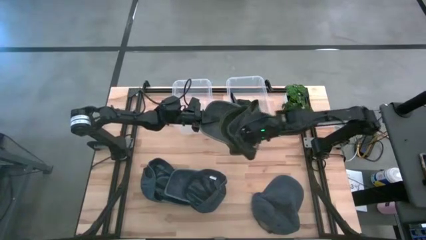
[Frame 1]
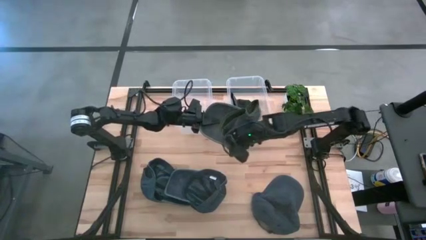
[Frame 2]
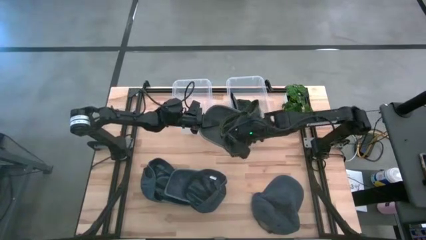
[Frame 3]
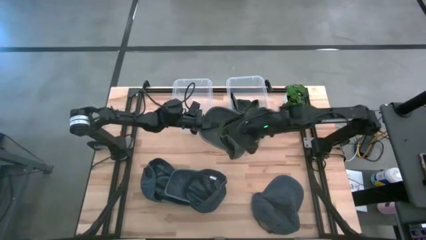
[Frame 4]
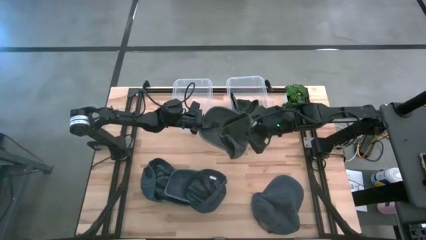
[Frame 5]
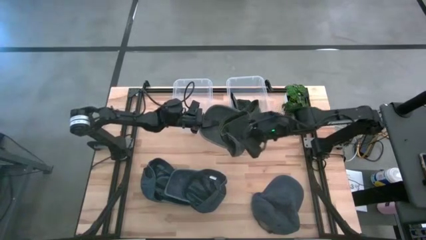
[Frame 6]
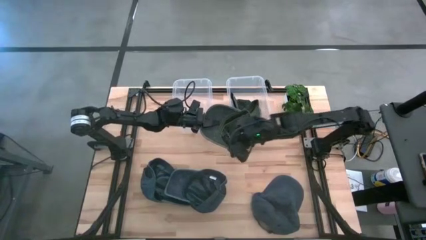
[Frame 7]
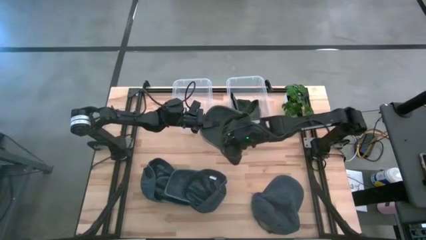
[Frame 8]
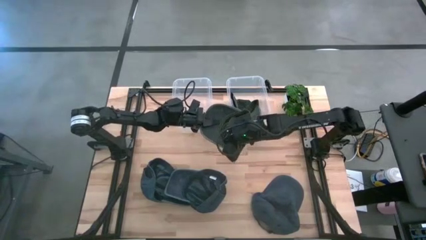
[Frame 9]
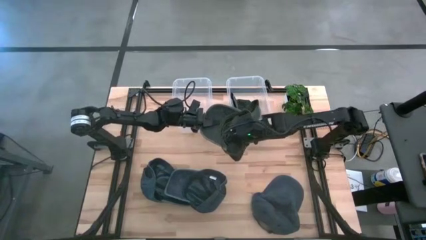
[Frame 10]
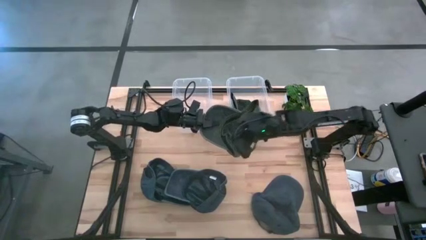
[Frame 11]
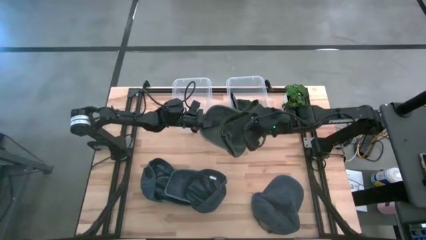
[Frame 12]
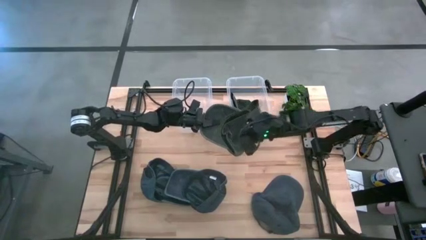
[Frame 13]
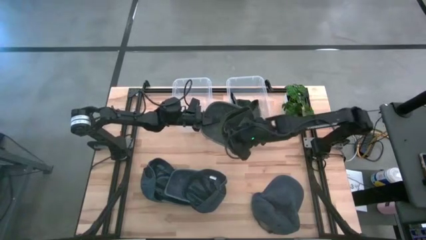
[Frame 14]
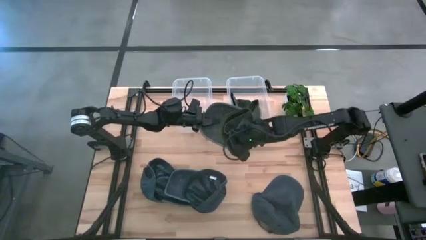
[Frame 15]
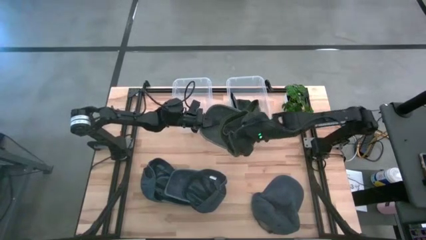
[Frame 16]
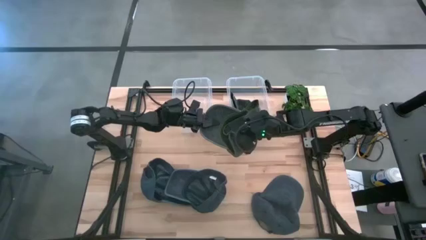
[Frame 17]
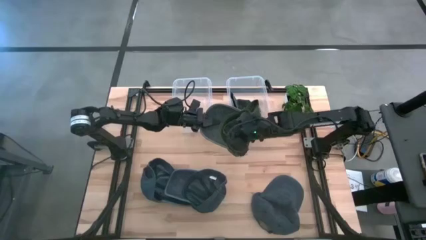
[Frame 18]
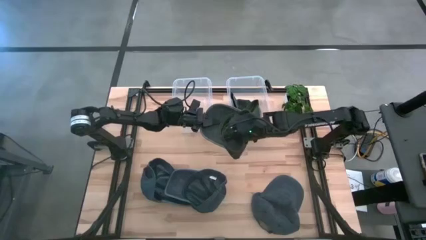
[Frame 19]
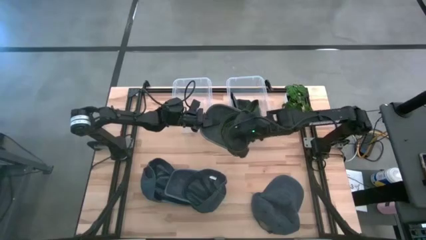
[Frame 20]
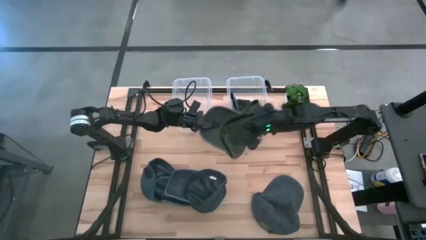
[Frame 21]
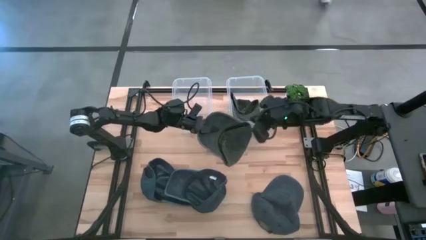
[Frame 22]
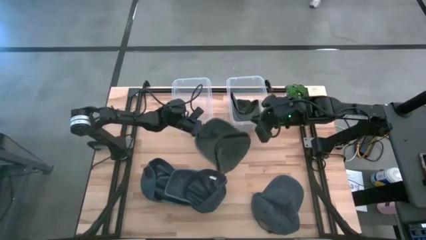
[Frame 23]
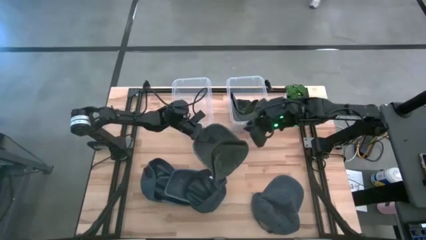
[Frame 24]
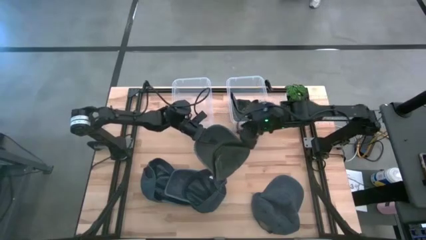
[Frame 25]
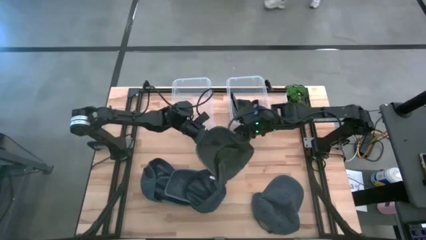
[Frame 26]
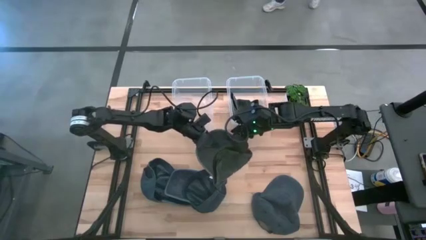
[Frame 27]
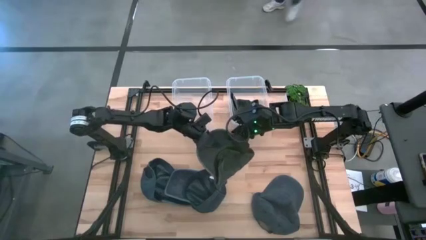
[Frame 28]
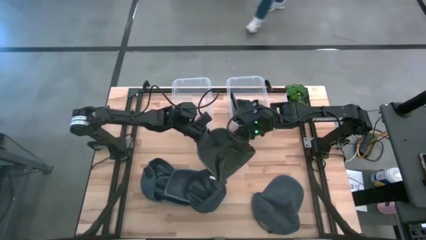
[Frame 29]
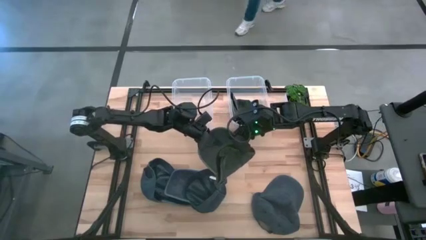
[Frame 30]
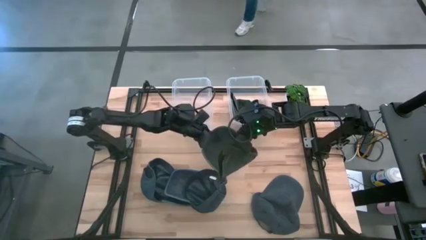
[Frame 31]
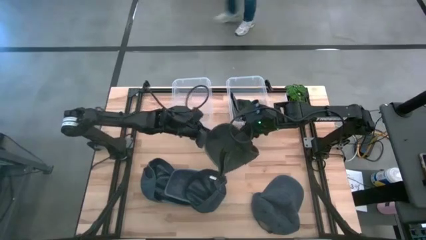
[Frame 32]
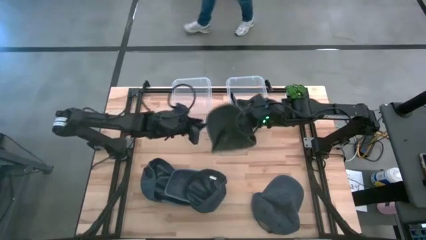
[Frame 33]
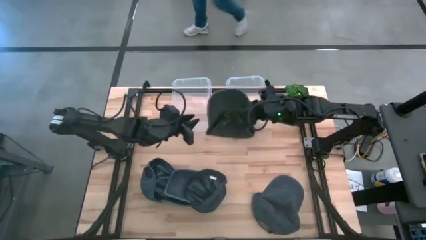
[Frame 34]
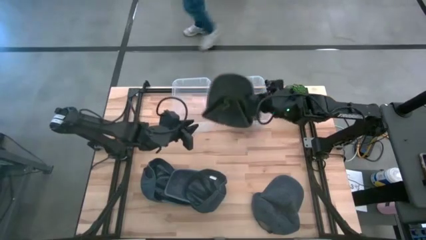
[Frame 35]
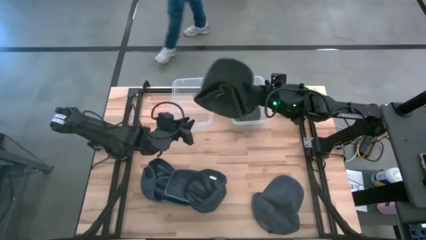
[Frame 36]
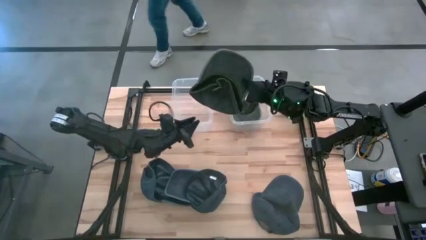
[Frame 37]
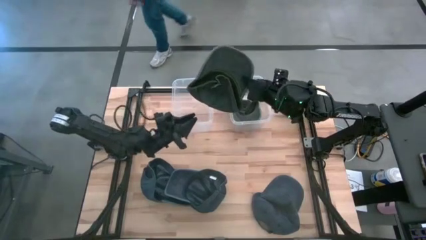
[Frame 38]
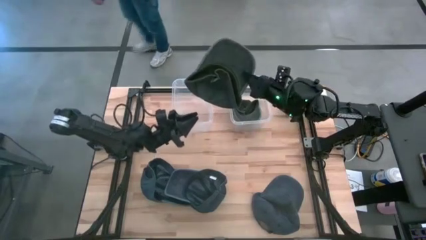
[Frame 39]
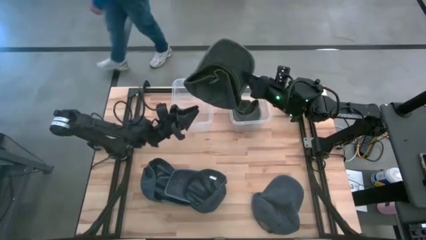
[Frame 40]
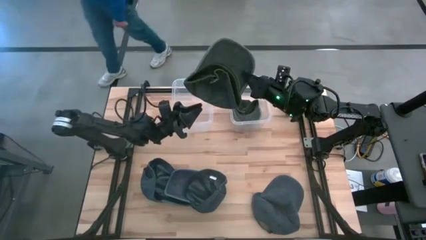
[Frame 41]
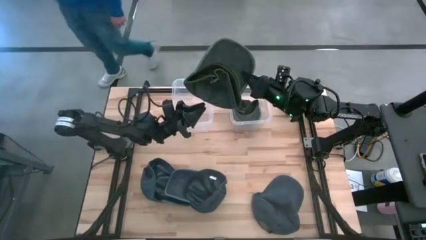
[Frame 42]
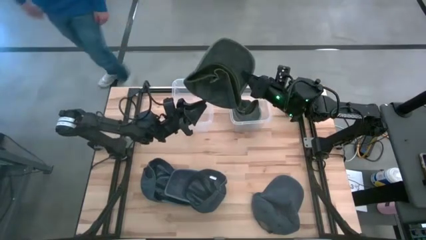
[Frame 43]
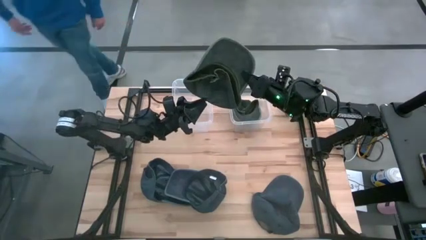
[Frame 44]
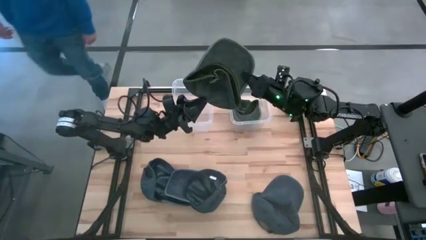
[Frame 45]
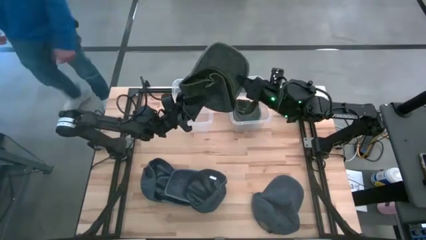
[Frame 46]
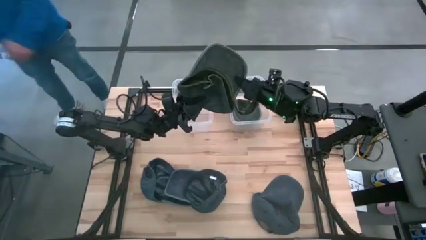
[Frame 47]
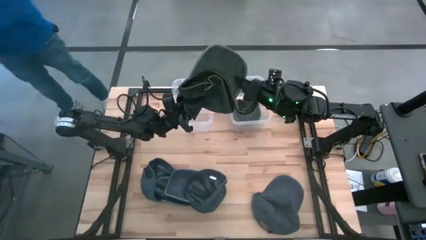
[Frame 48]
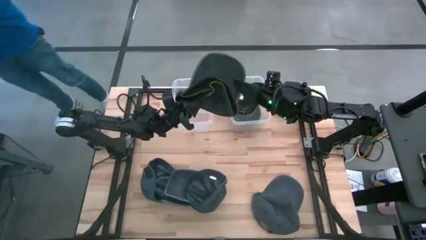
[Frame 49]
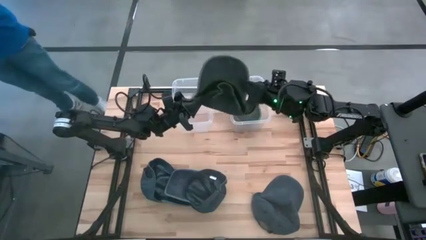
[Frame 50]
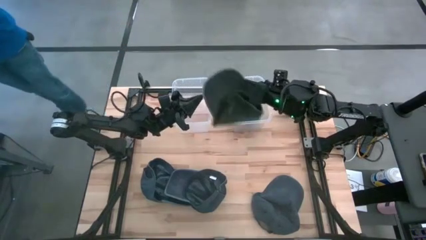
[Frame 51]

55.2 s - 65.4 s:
Task: Pick & Place hat
Put the gray cap into the right bin

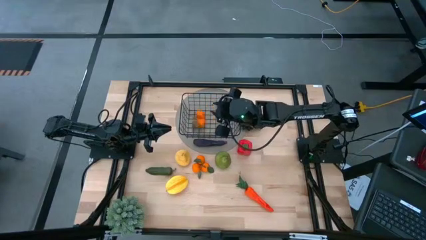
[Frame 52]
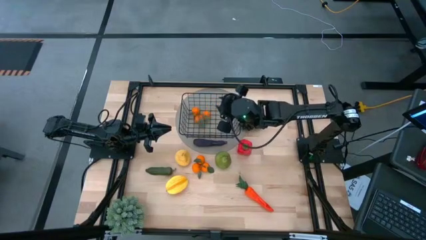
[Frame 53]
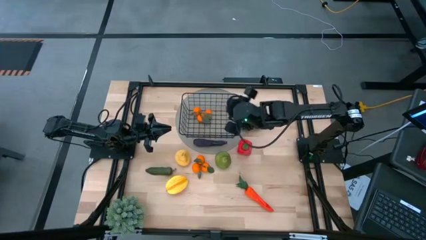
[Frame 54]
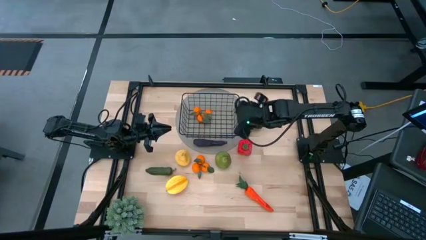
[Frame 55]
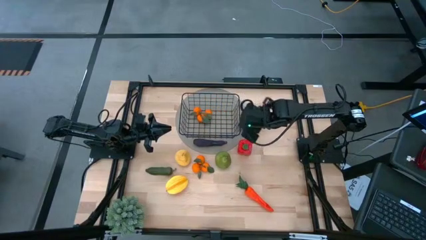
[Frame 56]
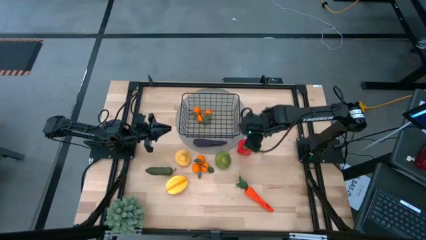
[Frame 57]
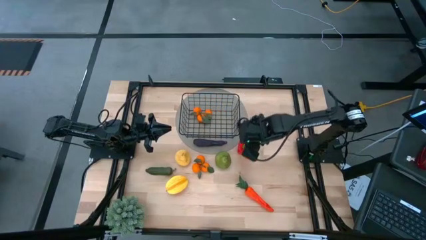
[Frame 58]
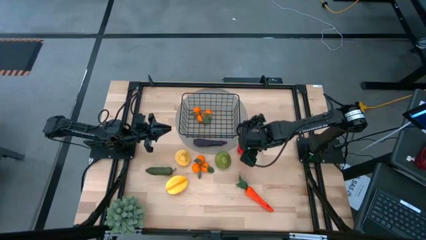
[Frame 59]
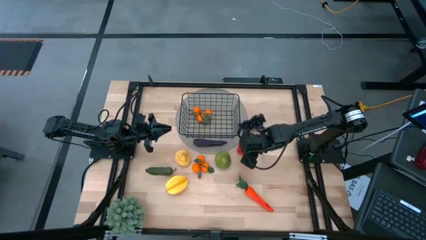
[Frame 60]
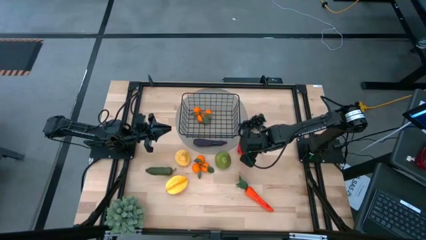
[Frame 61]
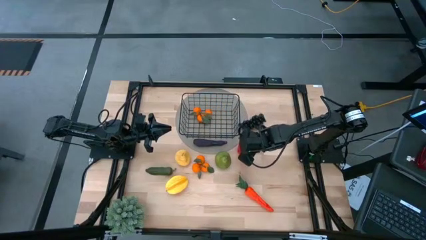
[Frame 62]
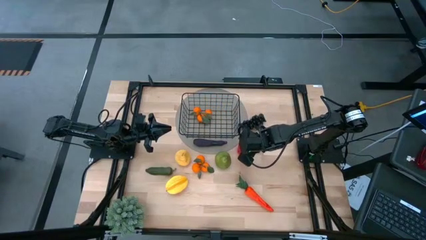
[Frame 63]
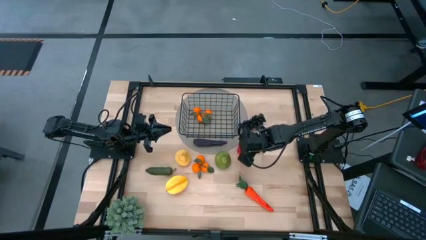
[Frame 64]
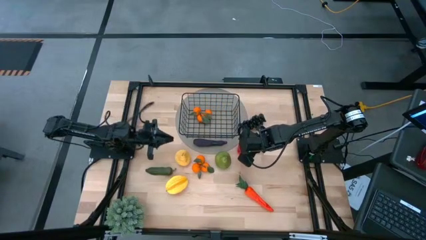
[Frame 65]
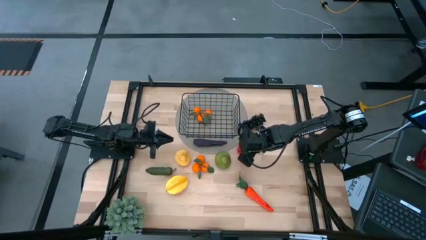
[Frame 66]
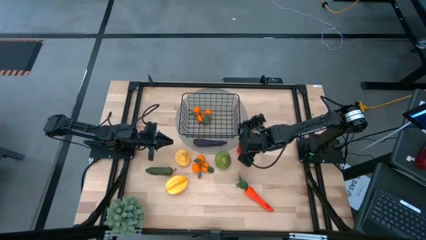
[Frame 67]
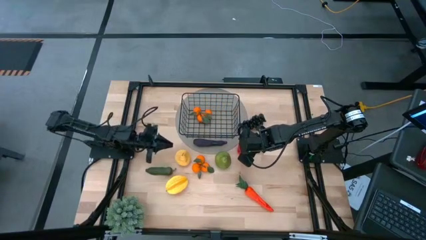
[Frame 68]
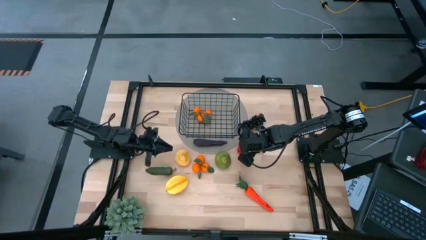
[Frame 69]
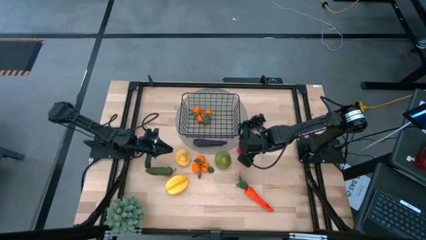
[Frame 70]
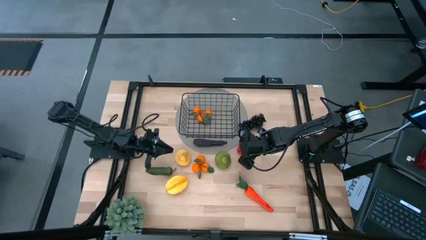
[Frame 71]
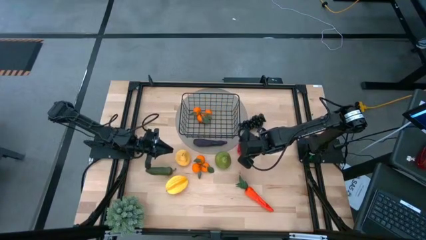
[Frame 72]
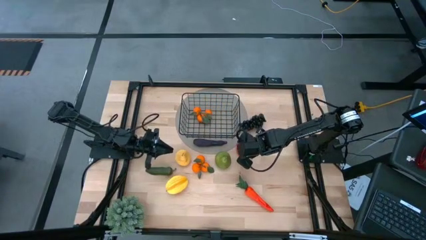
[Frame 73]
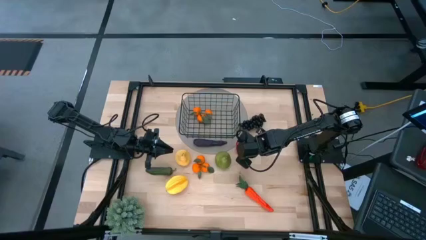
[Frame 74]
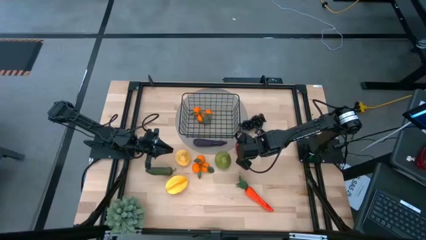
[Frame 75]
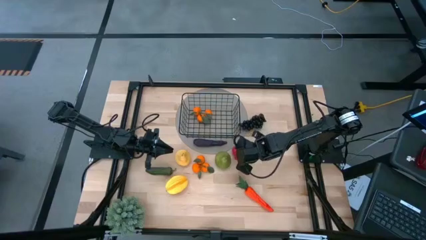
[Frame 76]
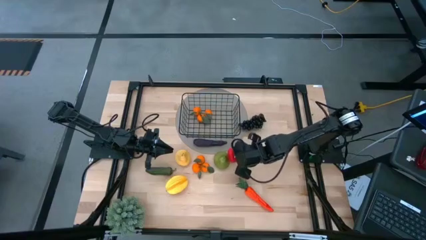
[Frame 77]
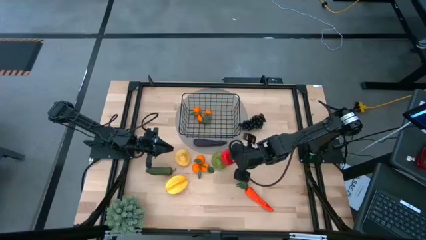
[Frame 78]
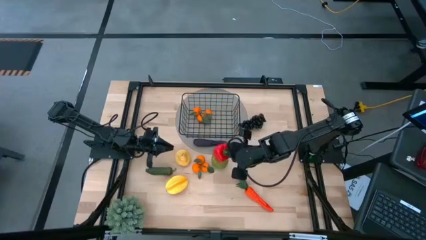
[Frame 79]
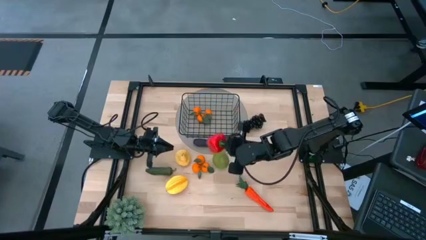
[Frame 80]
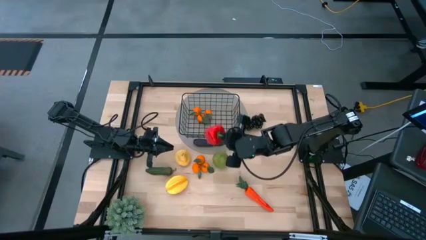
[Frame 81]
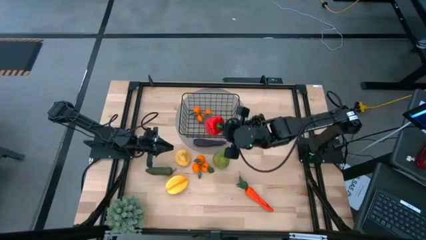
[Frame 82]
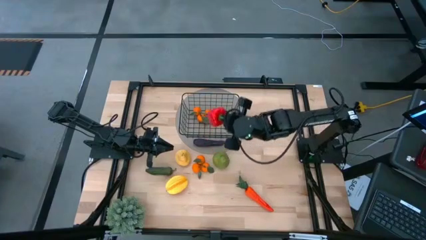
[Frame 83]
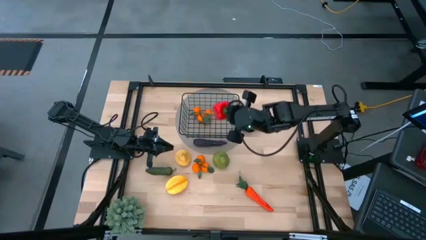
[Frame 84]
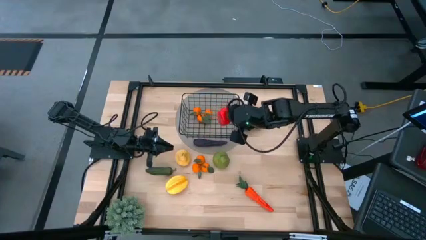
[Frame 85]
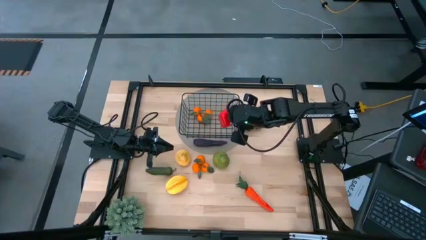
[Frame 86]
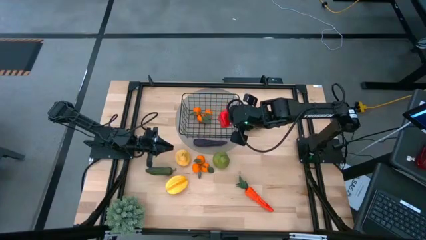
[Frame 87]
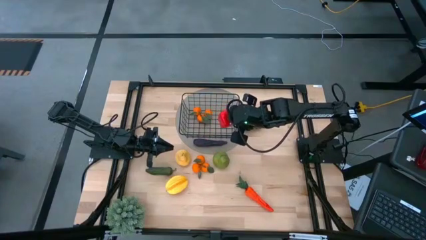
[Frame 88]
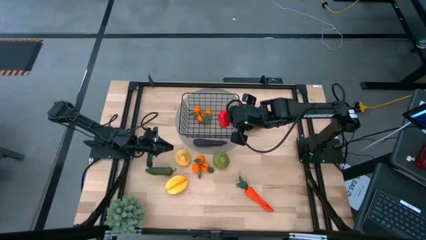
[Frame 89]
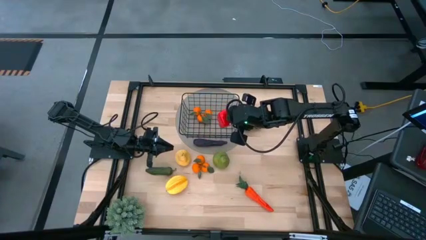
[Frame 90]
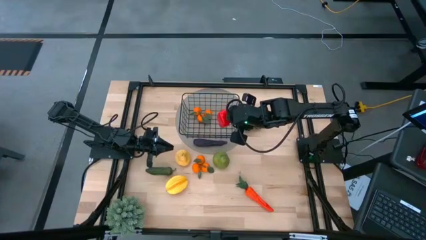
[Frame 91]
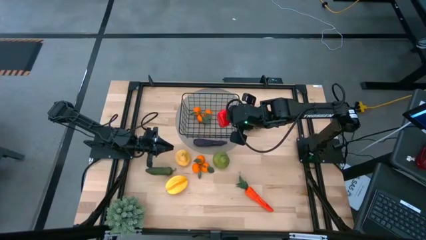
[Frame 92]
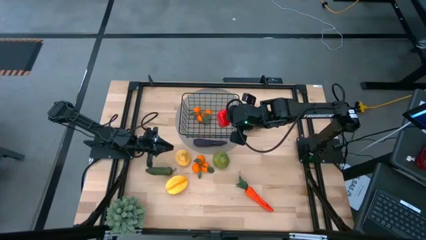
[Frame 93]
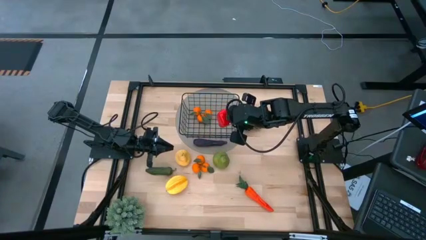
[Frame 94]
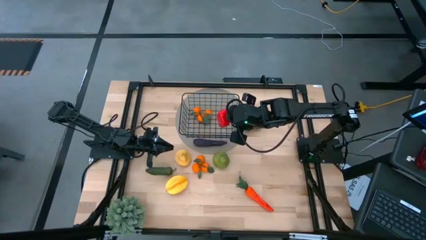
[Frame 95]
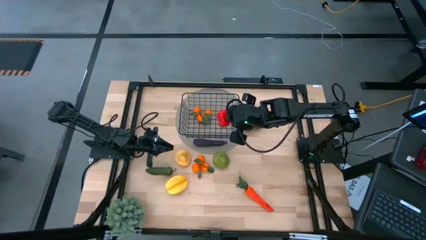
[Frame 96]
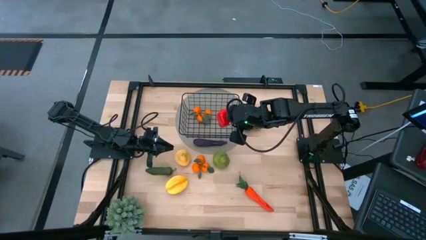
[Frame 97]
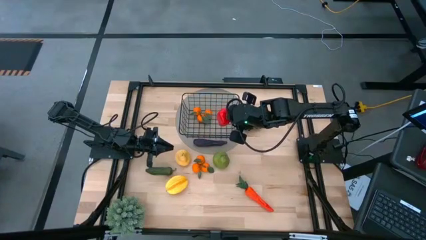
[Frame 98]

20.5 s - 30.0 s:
Task: Build produce basket
Put the red bell pepper into the wire organizer
